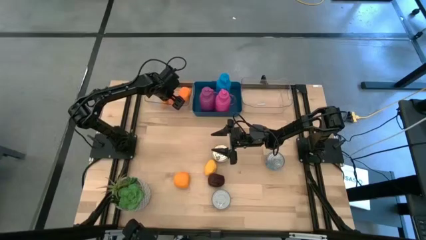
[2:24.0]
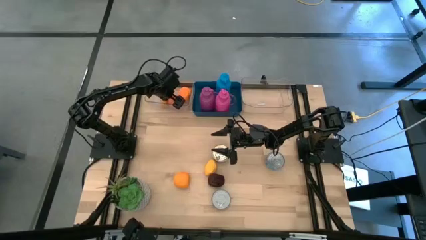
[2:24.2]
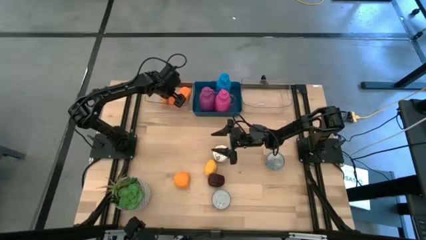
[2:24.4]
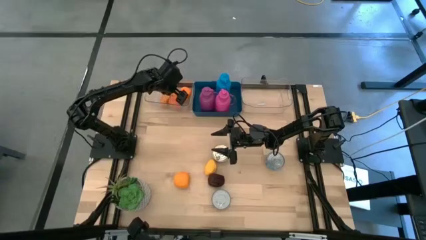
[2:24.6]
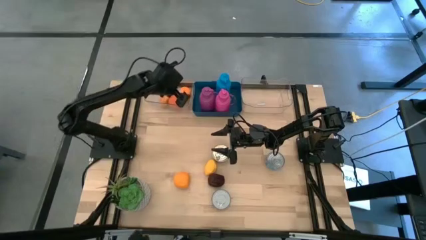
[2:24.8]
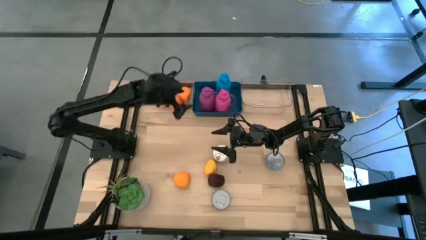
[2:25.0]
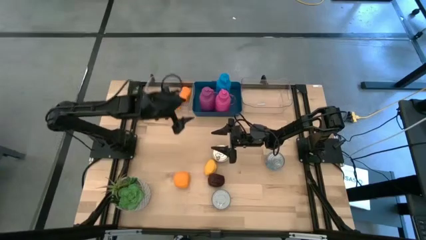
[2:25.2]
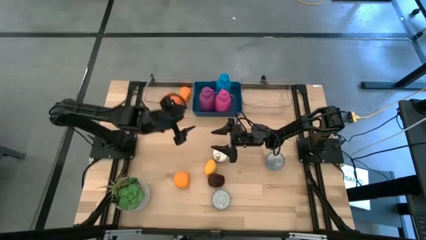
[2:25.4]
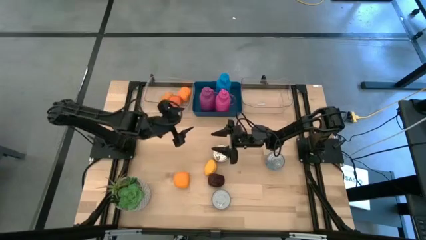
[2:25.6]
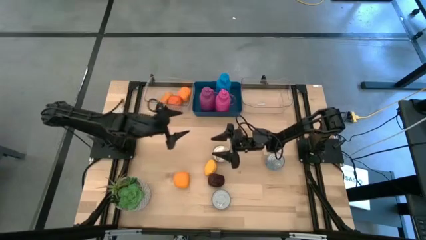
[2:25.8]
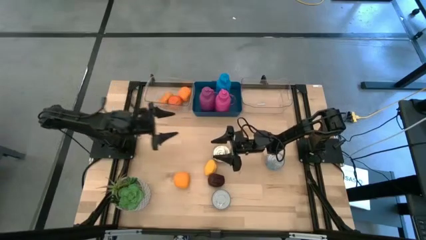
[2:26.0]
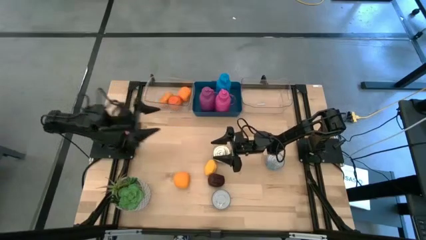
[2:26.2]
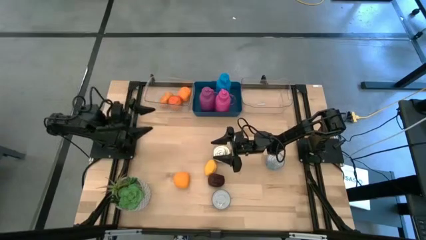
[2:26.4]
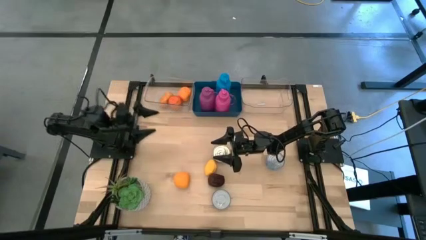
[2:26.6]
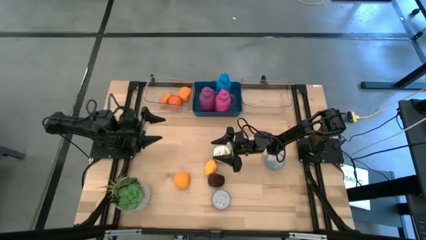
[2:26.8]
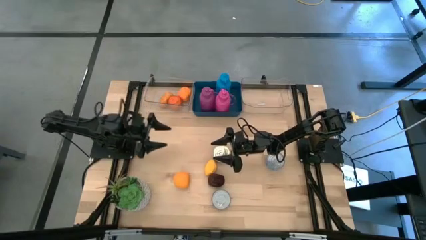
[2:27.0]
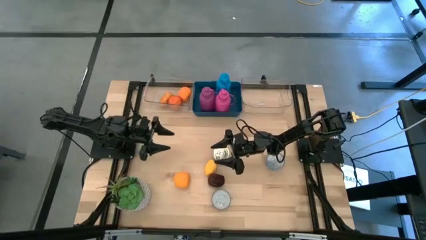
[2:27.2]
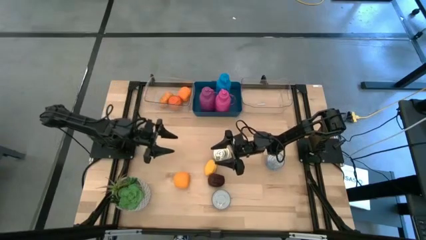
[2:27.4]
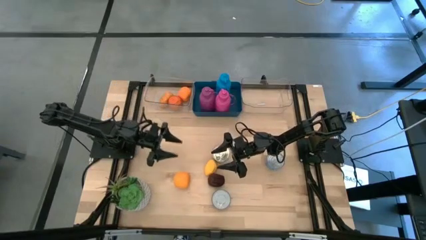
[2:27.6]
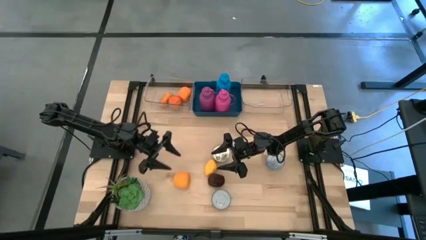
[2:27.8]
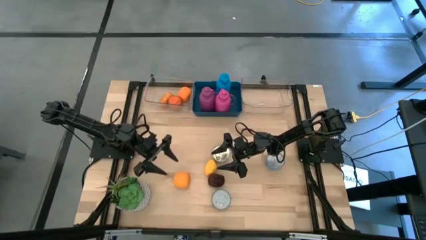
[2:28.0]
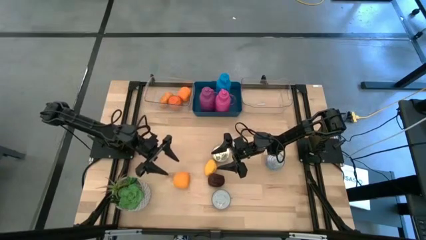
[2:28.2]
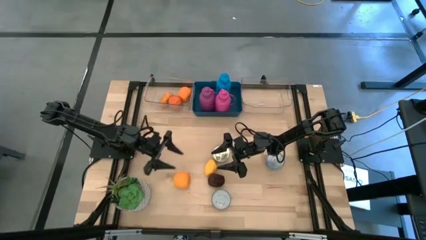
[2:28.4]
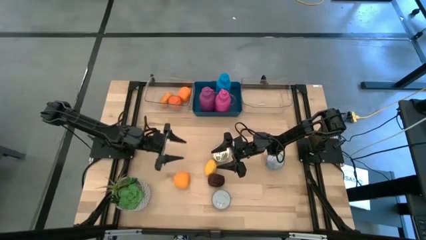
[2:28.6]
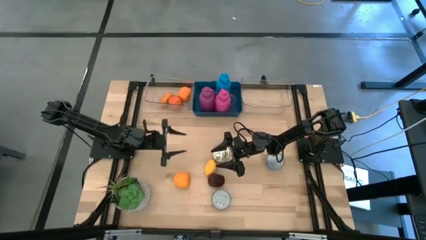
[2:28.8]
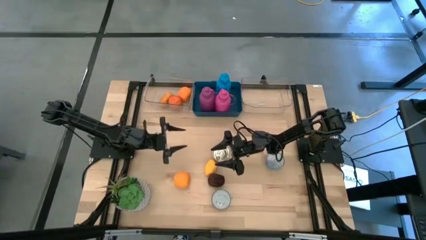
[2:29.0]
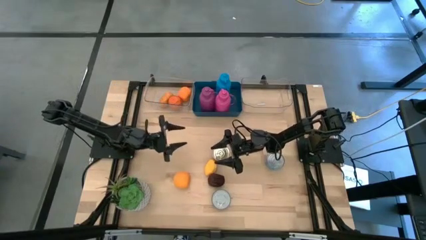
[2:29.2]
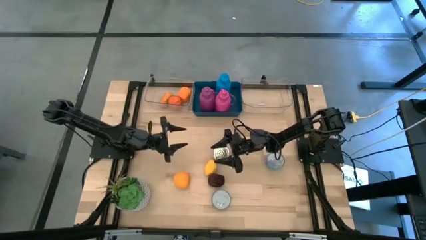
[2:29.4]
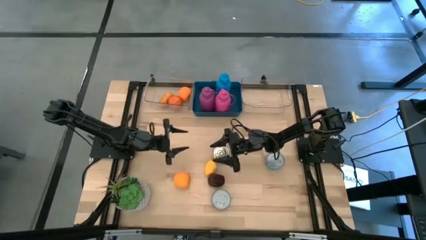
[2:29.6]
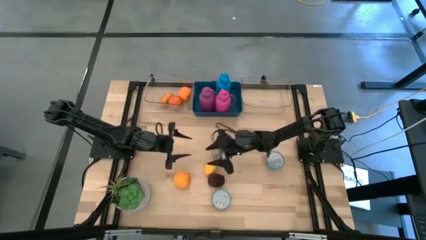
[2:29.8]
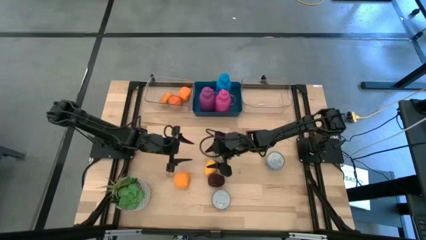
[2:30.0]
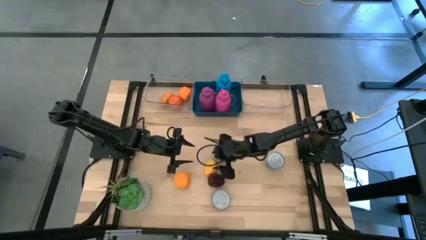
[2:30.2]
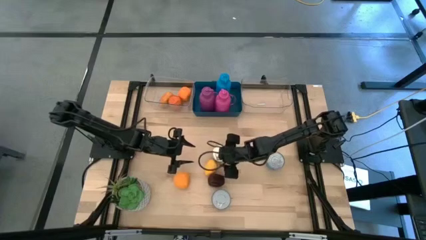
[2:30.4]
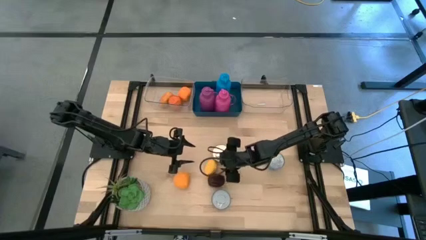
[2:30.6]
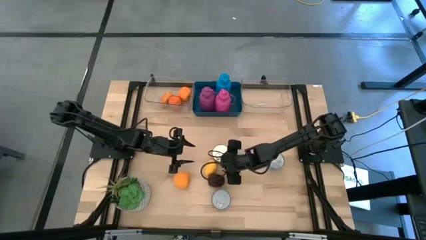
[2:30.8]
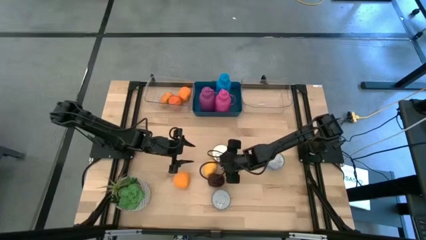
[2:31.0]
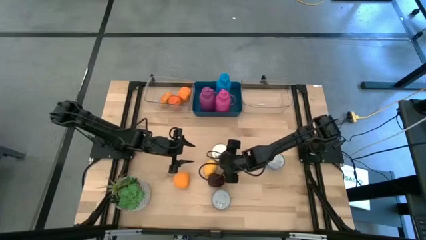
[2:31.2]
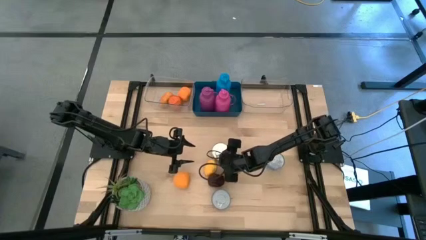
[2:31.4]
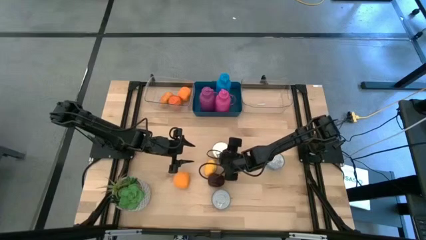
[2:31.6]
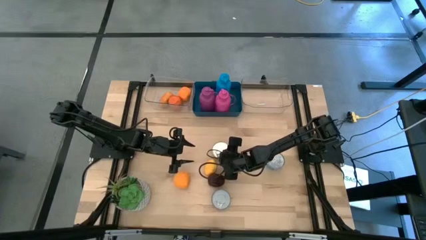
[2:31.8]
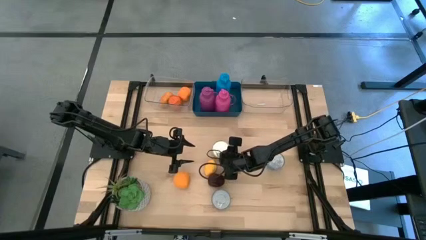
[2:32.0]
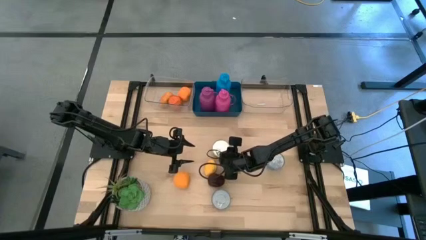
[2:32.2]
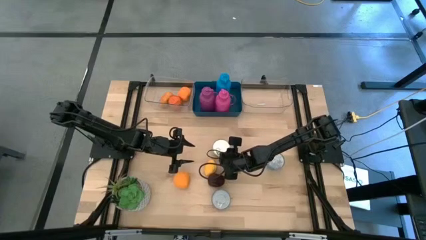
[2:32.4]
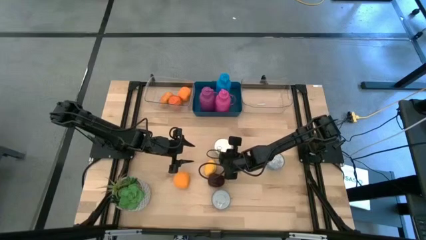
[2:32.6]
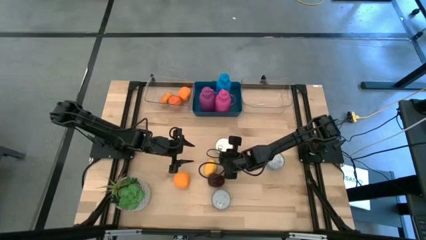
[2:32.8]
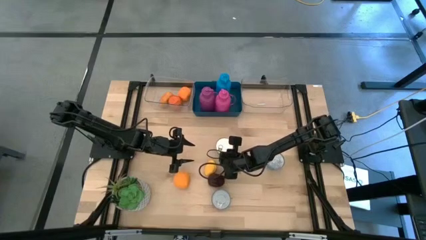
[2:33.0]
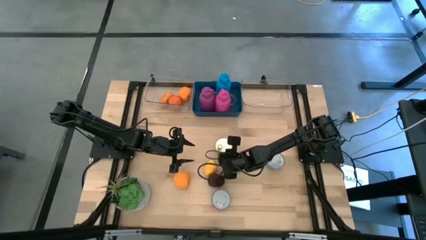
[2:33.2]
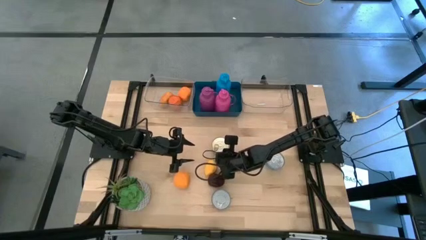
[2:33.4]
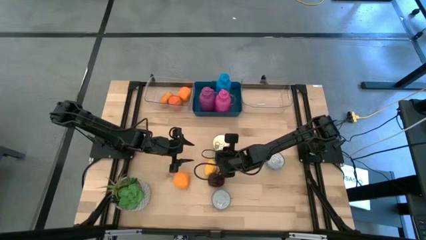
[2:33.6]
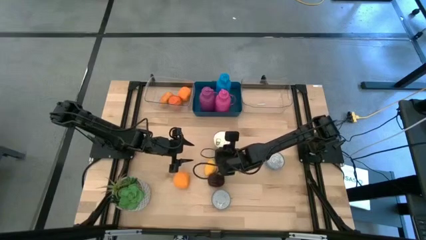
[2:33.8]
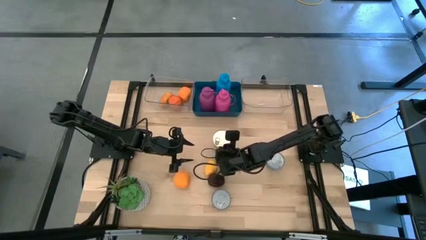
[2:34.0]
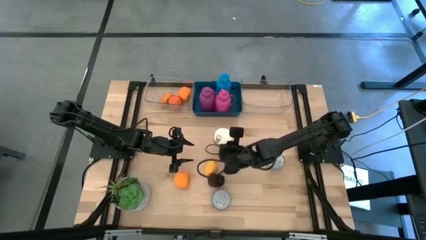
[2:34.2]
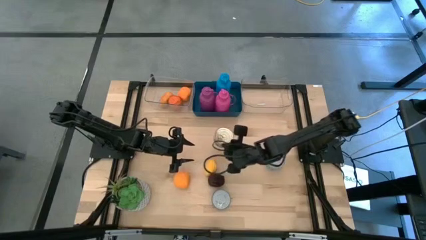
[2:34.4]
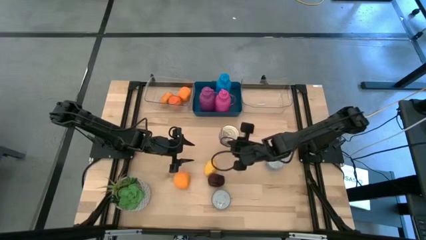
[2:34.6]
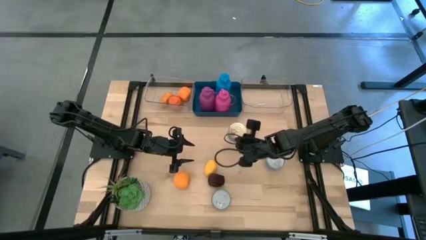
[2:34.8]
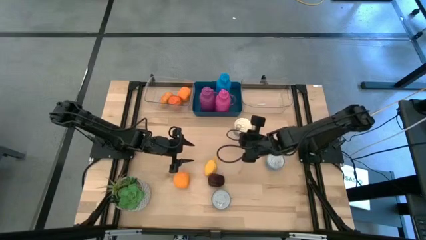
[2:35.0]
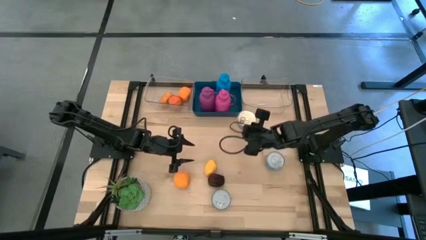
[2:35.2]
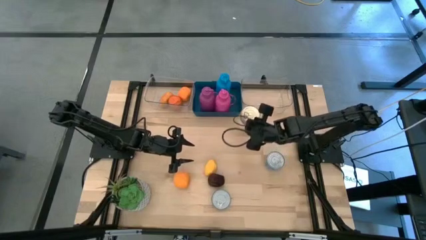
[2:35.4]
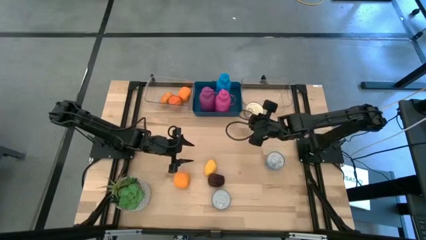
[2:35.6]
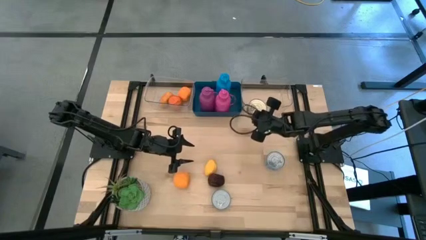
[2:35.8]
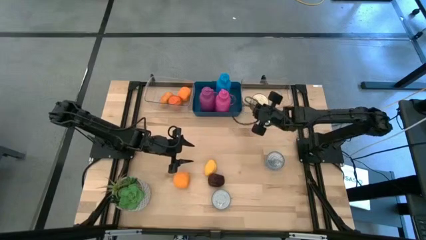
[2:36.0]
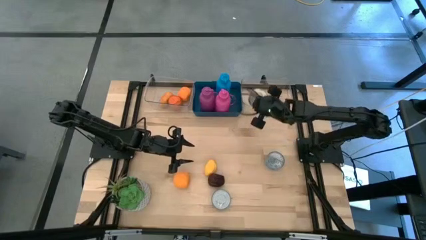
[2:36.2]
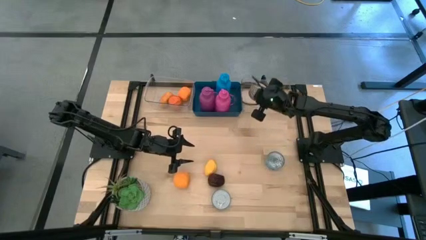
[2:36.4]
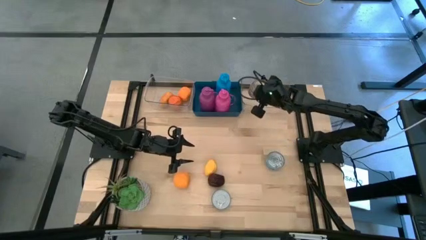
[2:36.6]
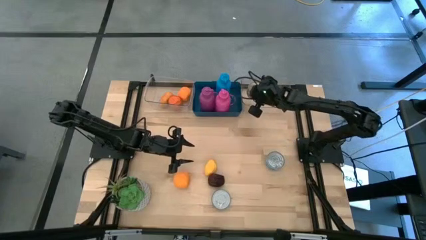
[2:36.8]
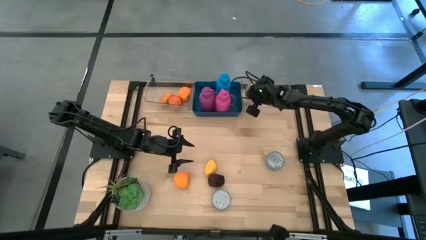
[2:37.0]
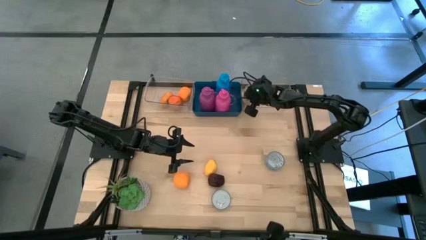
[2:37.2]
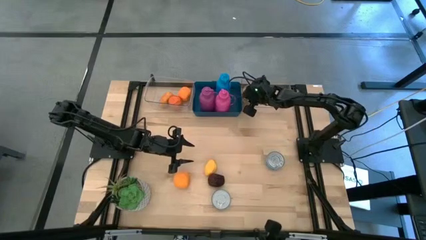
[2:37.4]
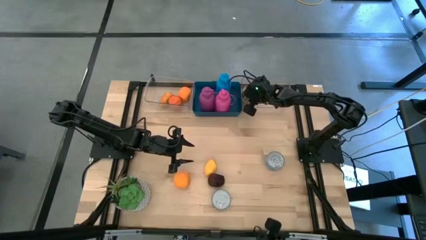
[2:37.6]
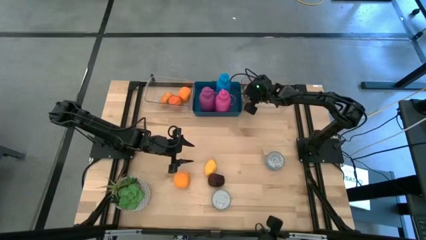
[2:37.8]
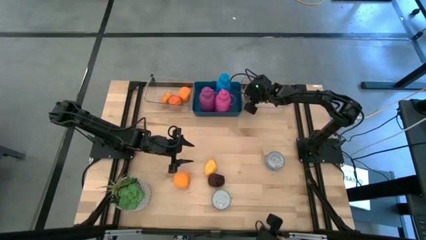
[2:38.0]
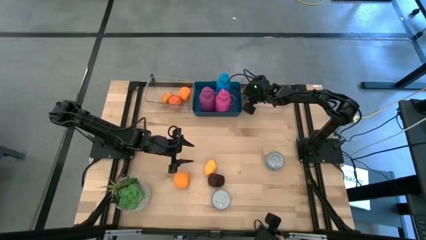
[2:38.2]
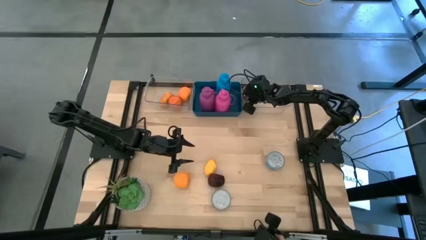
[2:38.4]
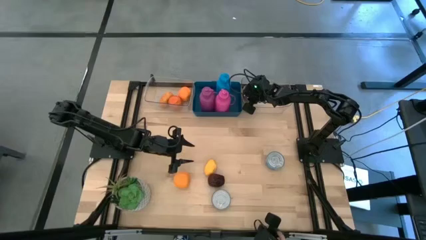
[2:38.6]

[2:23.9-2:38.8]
Task: Pick & Place Food Item
Put the blue pink tuna can into the right transparent bin

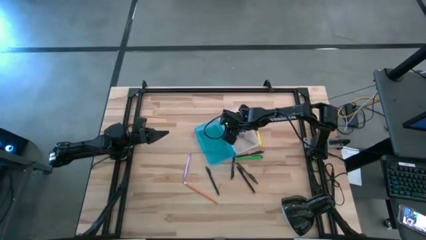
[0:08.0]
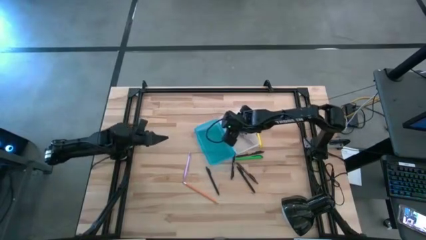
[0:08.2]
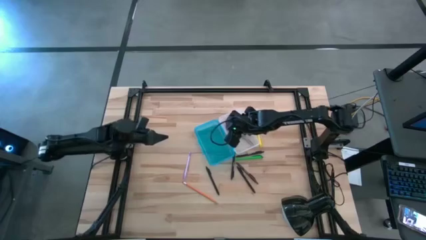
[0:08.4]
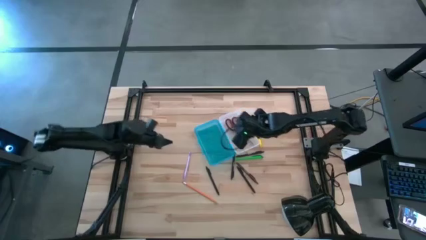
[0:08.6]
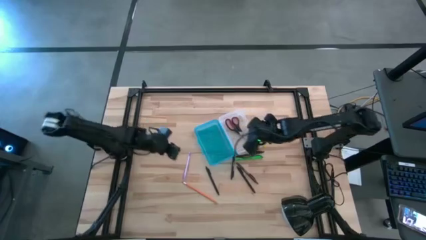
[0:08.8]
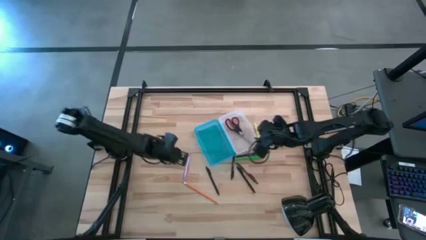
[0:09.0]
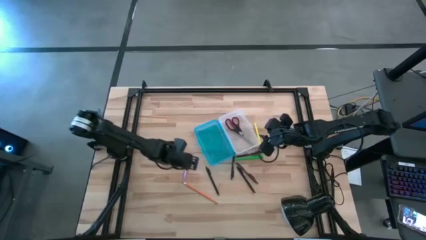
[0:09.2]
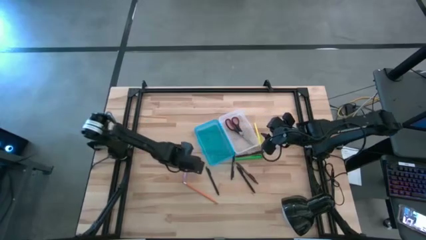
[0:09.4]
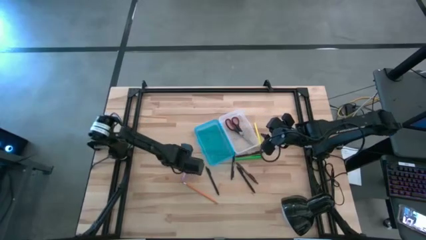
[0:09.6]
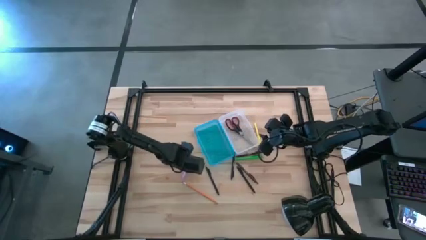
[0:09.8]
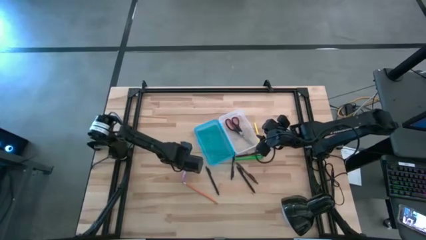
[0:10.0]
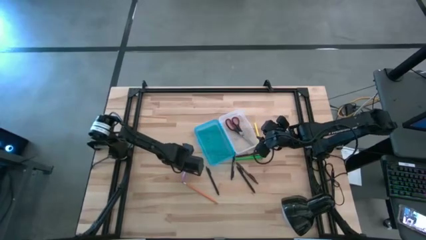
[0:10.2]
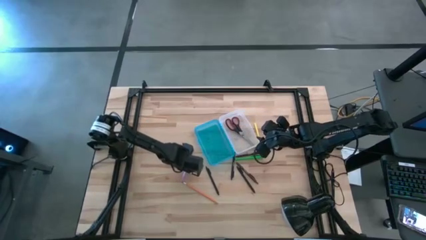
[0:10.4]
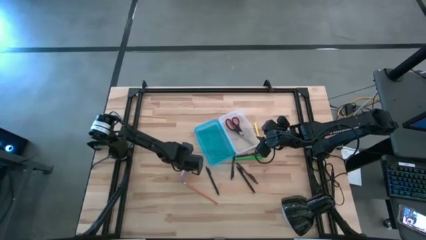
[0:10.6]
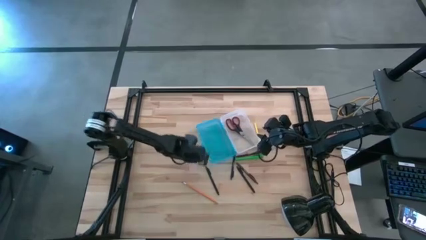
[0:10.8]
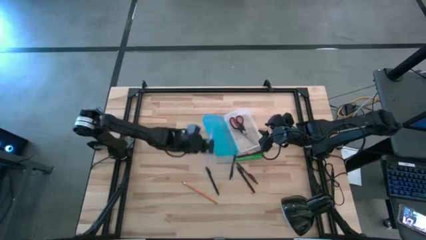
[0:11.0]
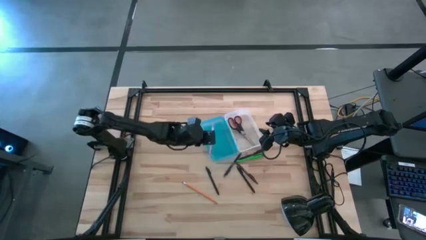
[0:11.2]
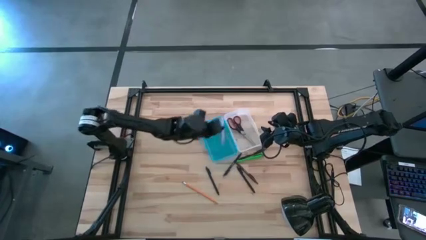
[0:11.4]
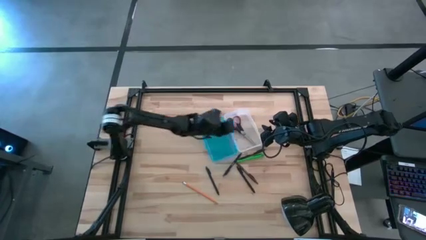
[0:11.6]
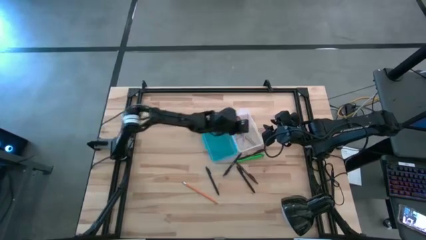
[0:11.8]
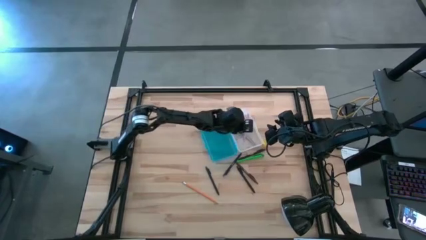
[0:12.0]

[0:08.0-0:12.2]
Task: Pick & place school supplies into a supply box
Put the purple pen into the blue supply box
